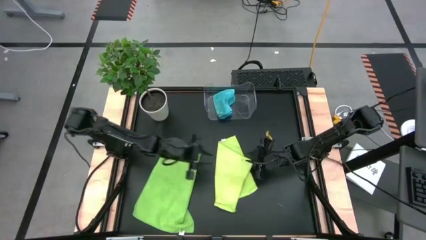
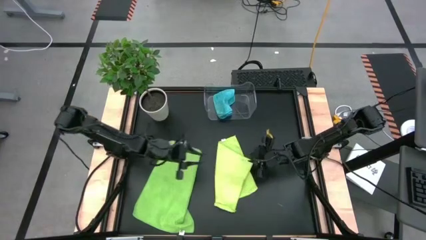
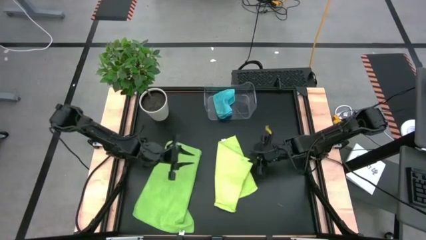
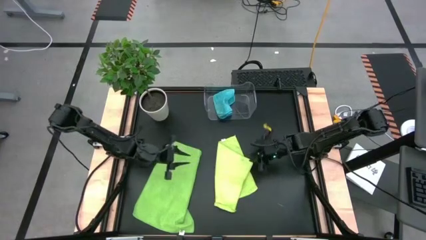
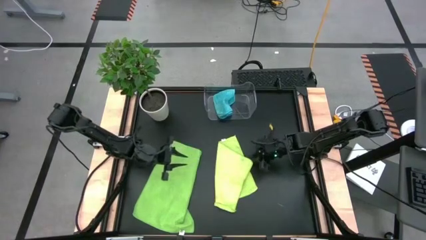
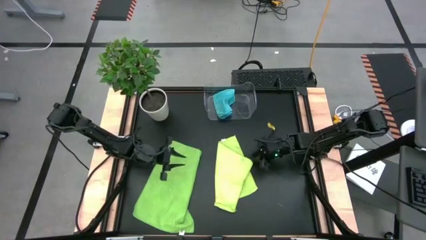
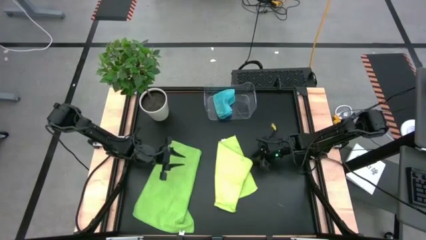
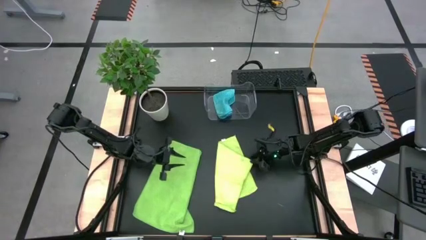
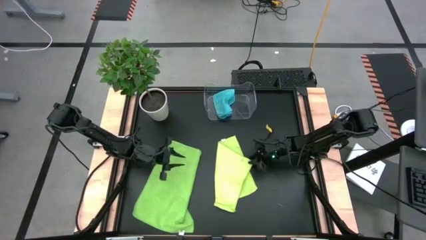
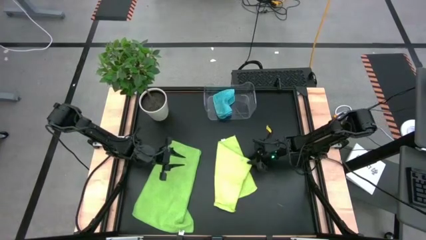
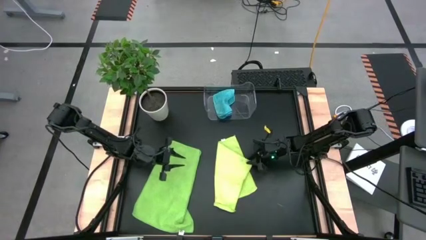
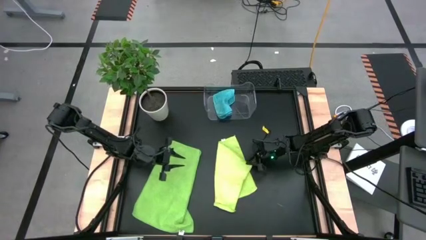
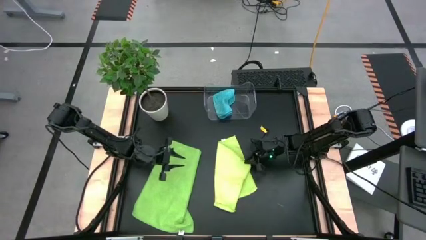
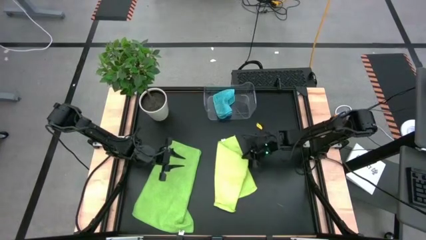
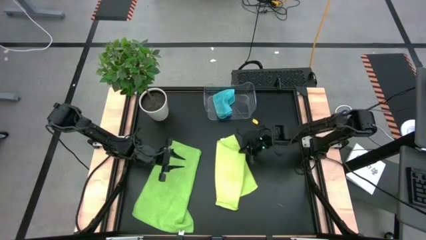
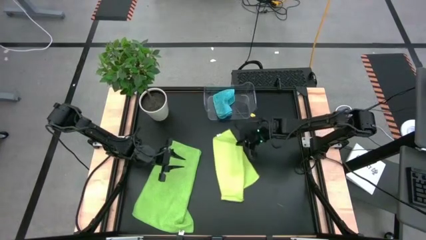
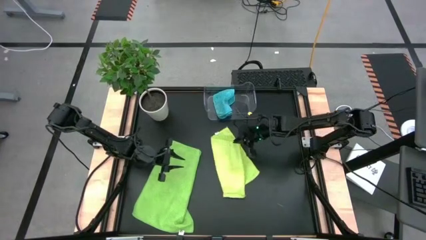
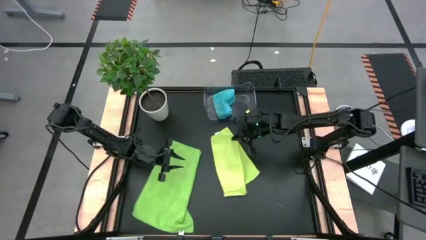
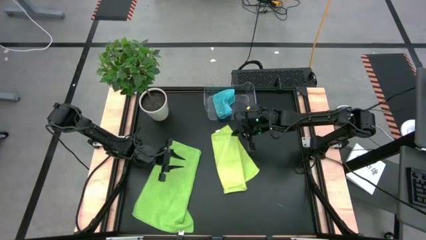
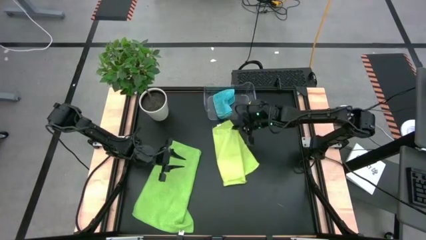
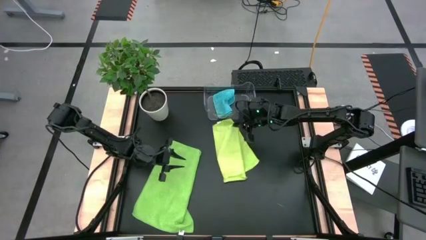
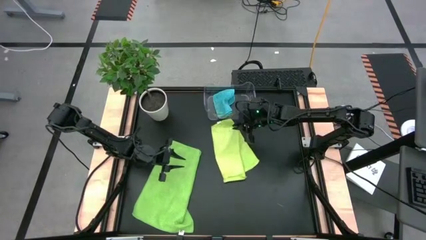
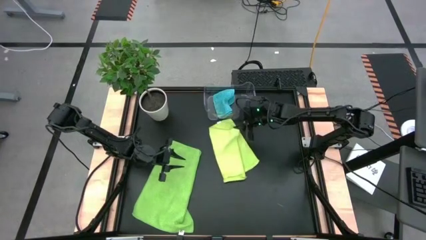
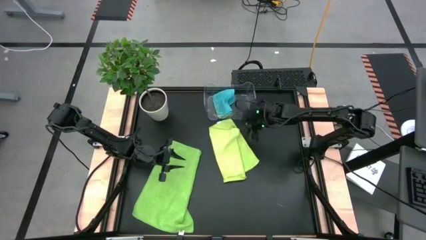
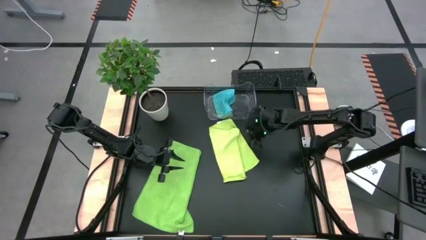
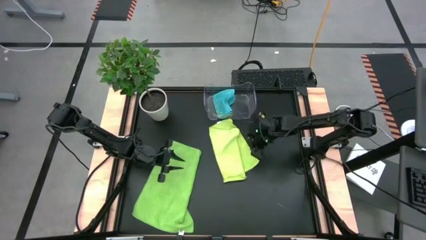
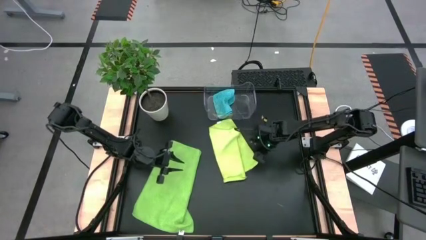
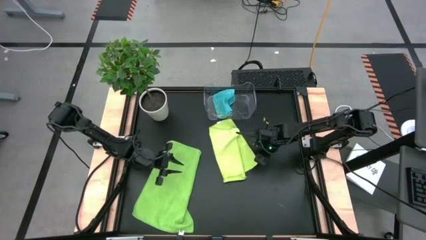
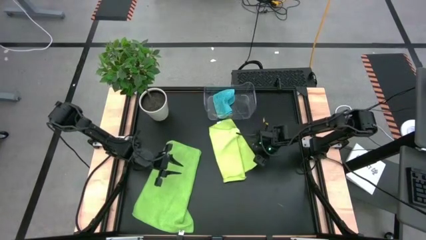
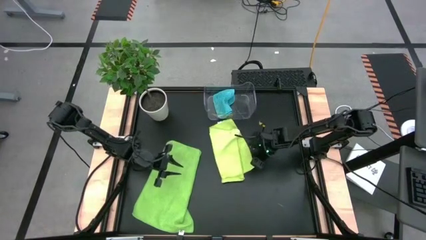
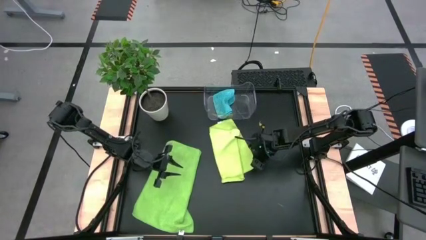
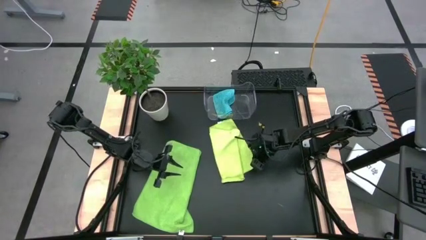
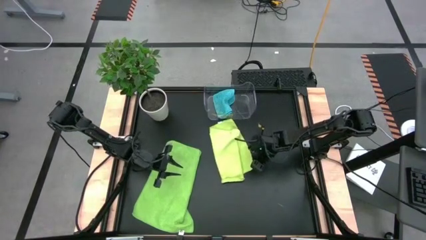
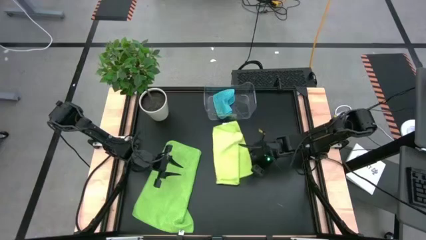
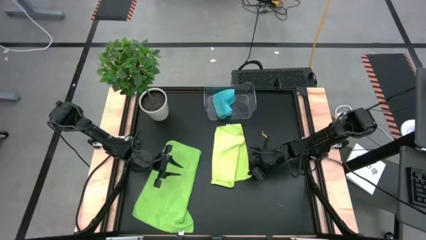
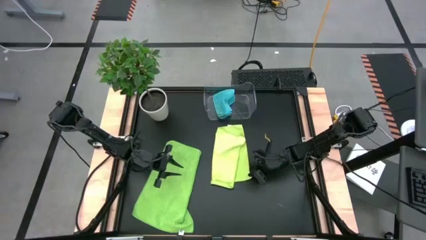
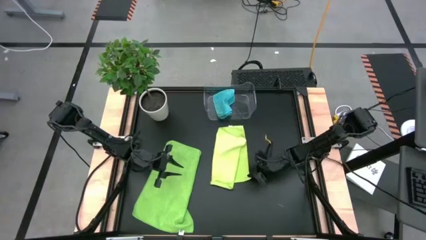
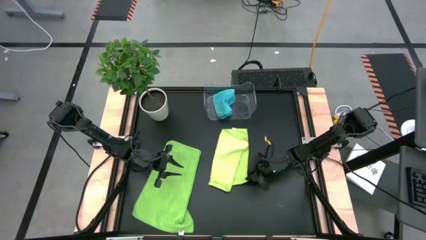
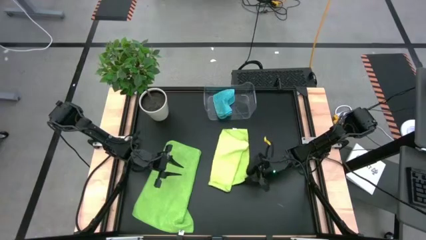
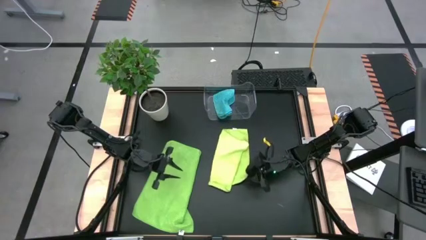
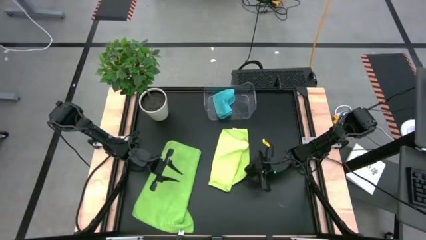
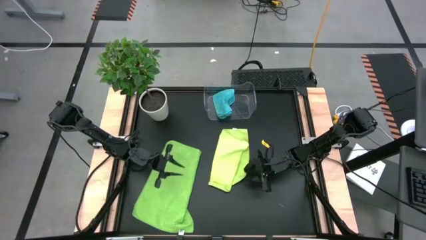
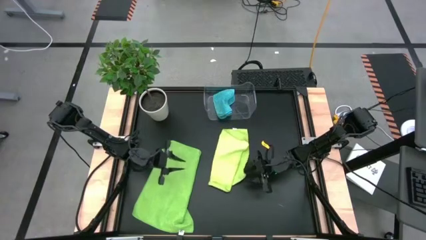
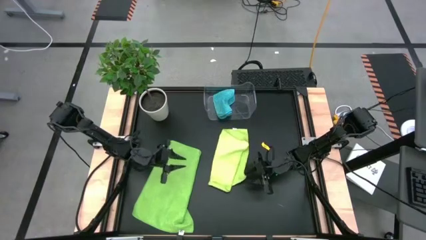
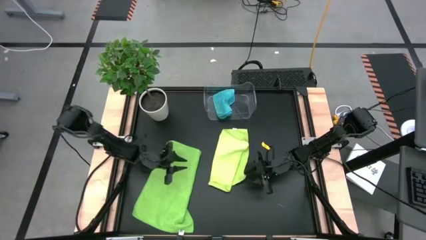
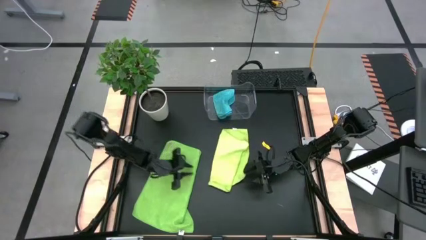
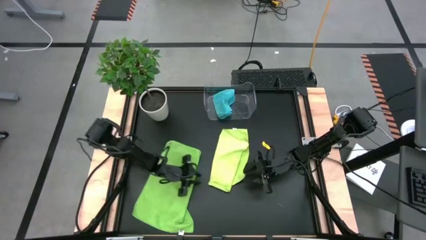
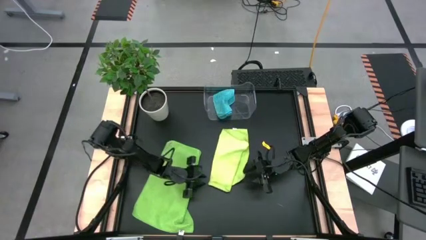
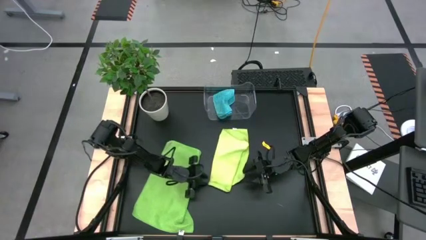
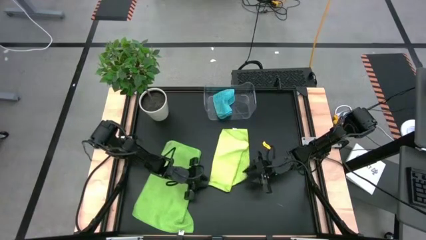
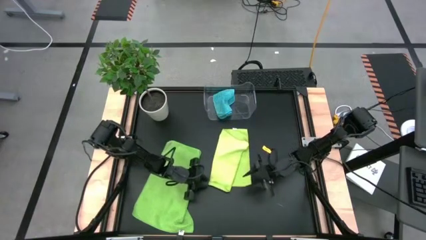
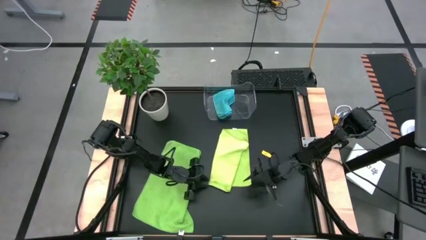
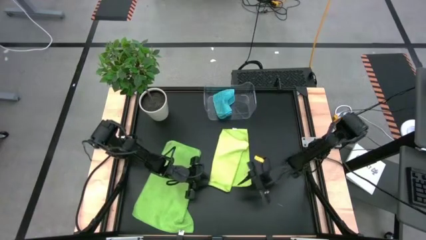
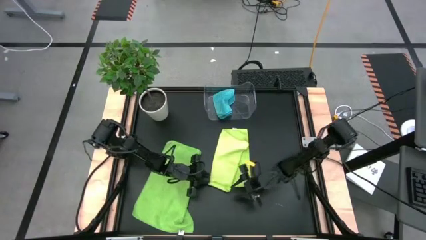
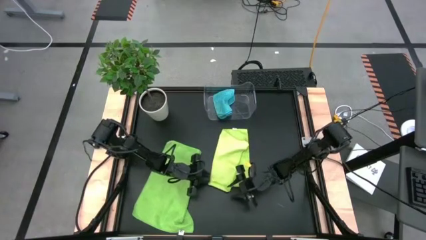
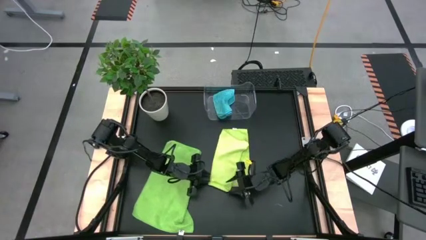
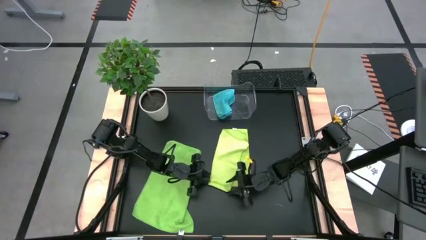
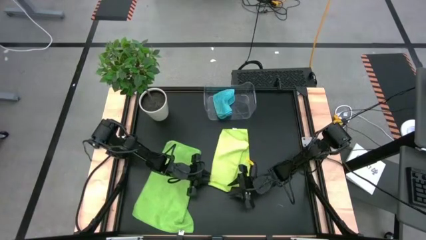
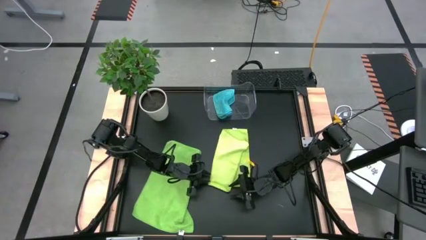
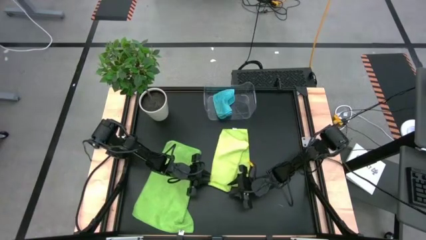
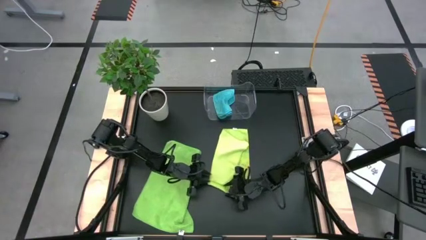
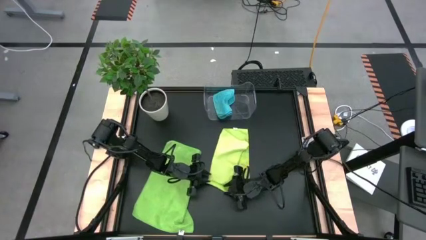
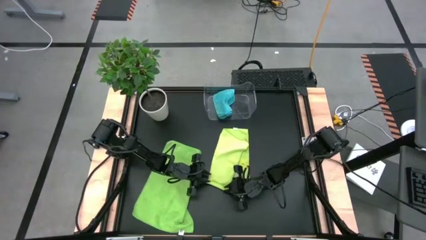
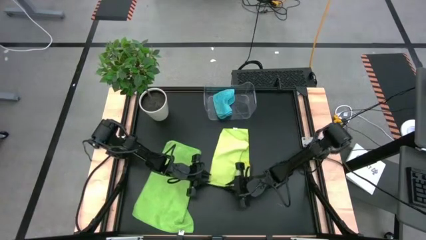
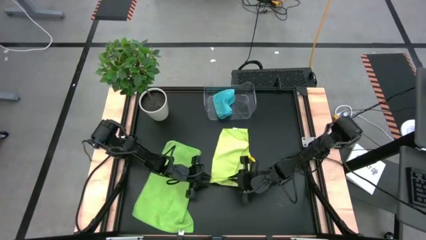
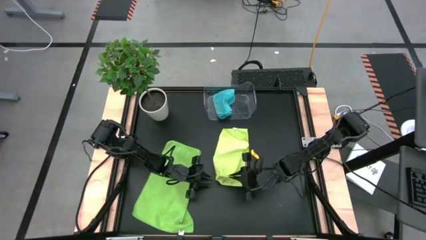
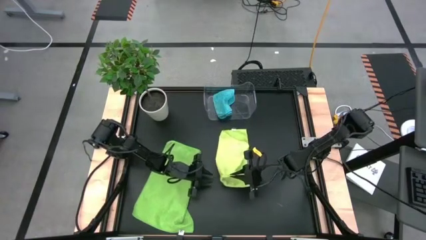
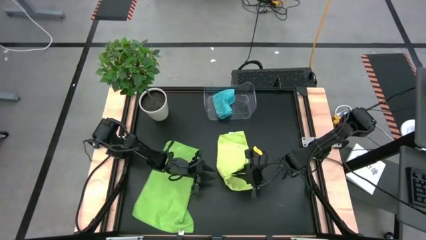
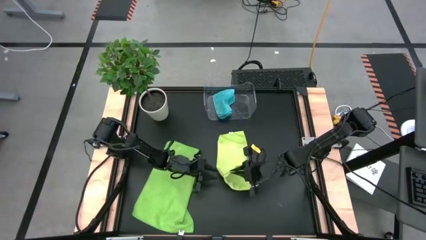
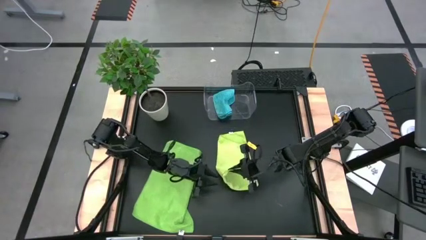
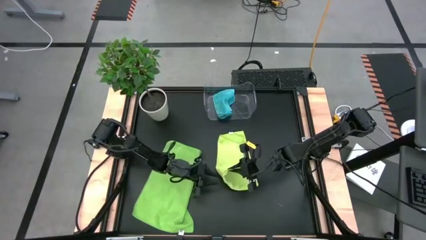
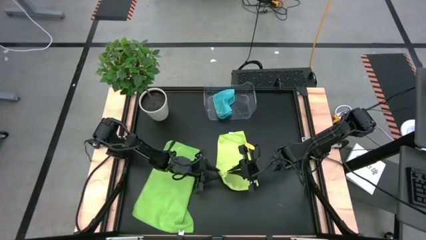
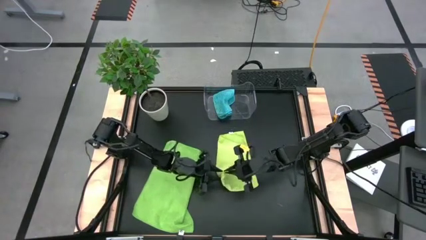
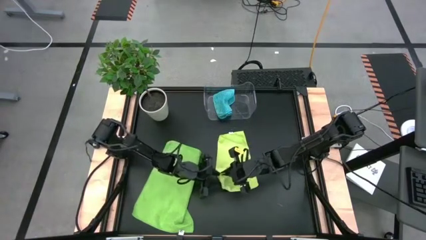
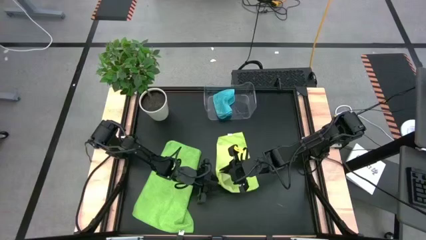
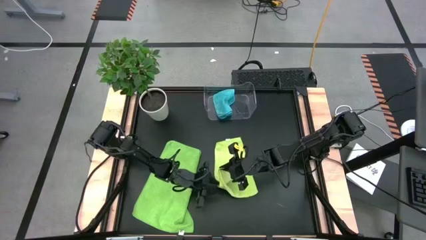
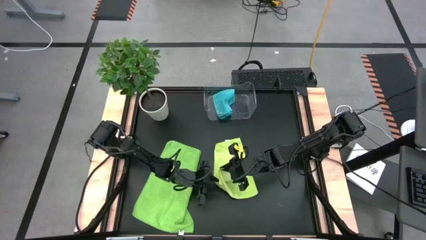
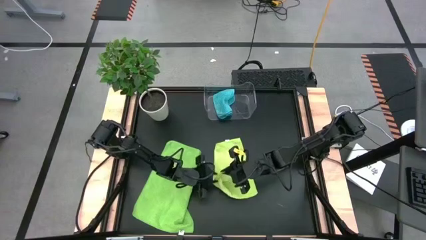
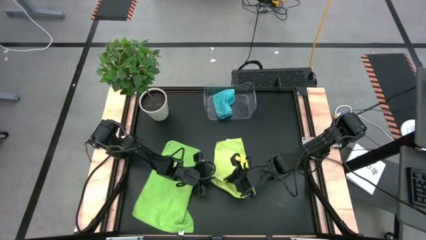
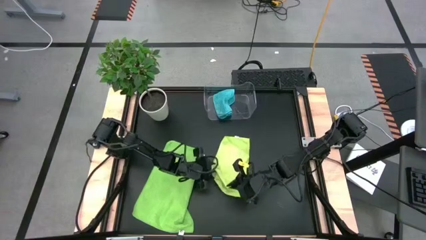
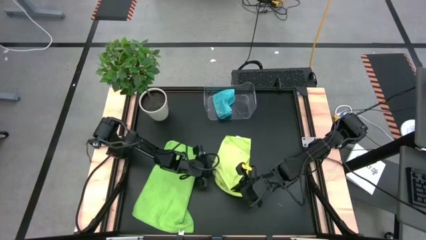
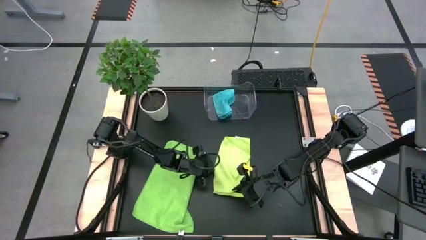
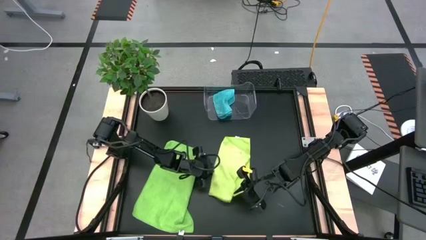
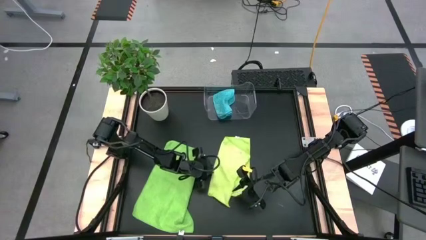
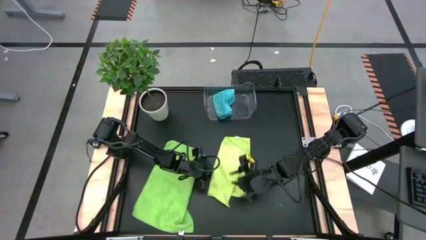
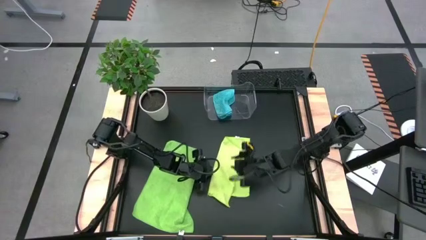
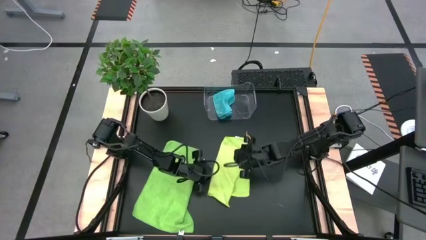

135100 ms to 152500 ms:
Task: Fold microfiber towels
Fold the light green microfiber cloth
